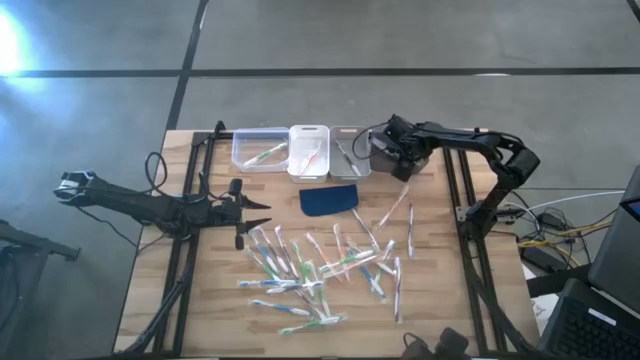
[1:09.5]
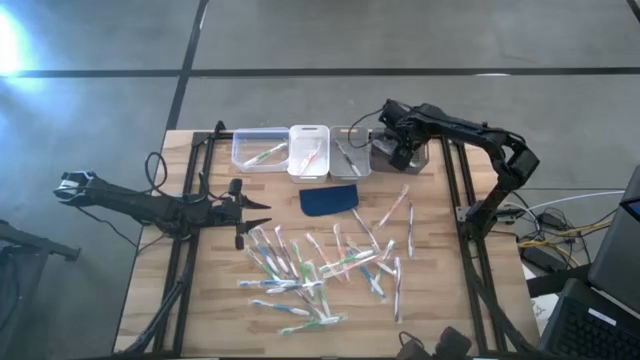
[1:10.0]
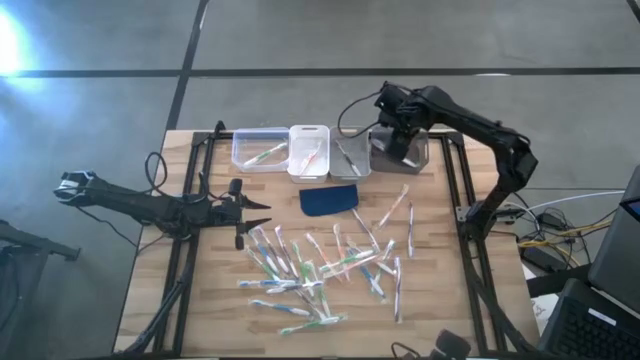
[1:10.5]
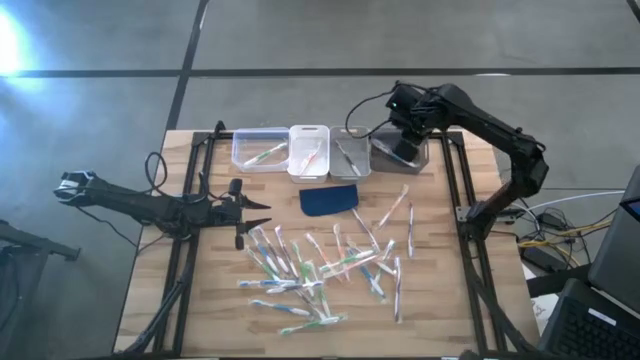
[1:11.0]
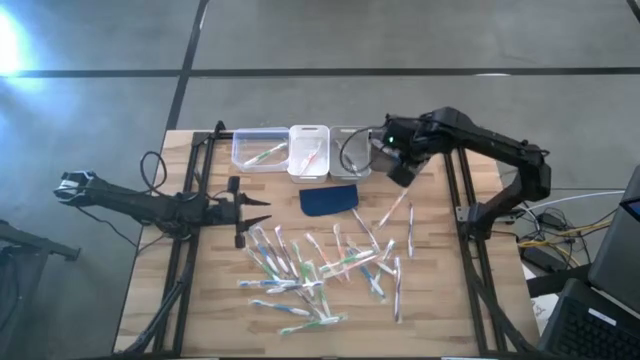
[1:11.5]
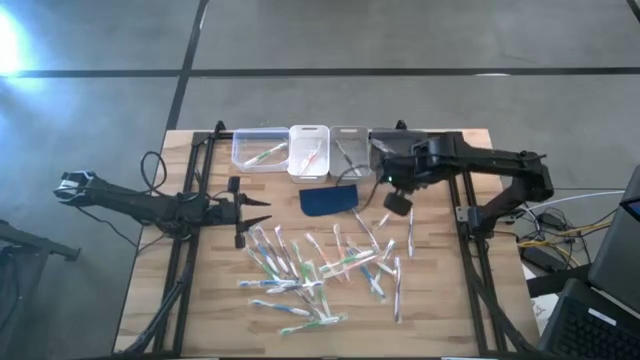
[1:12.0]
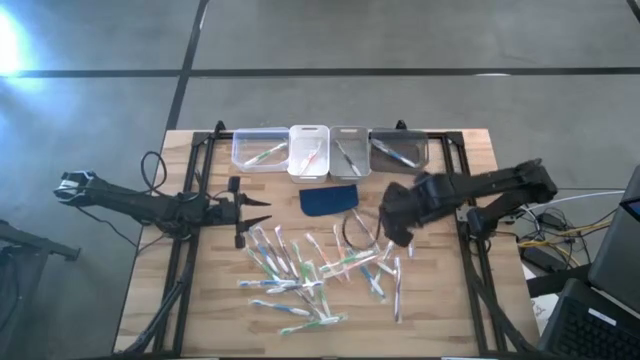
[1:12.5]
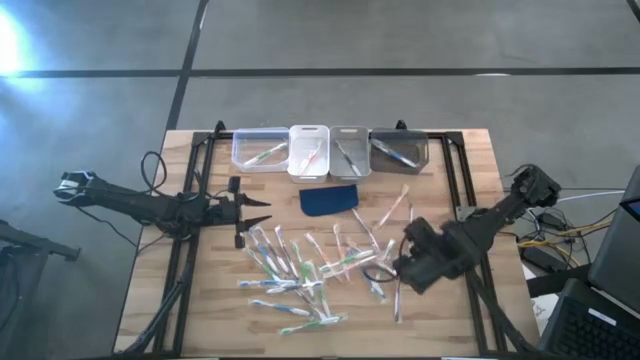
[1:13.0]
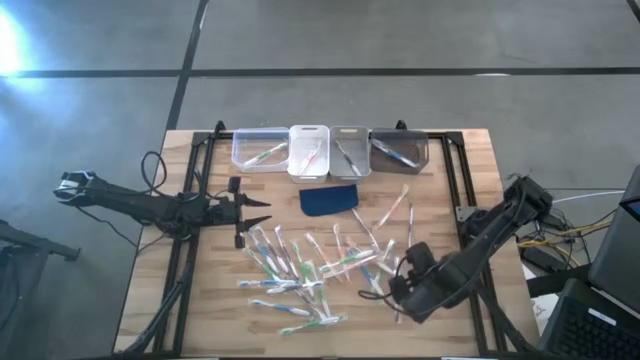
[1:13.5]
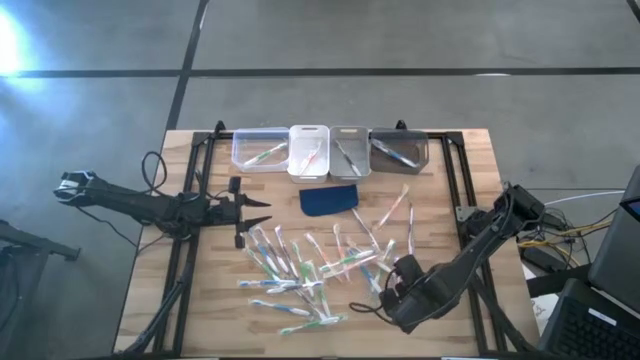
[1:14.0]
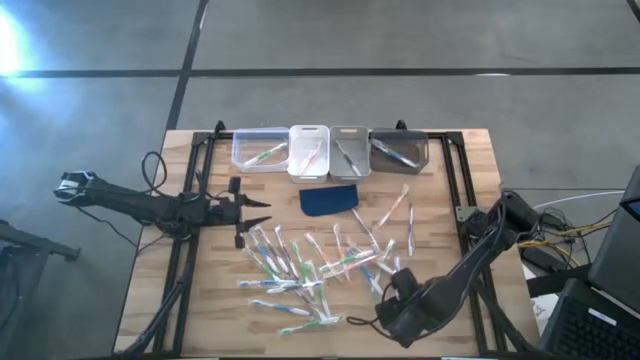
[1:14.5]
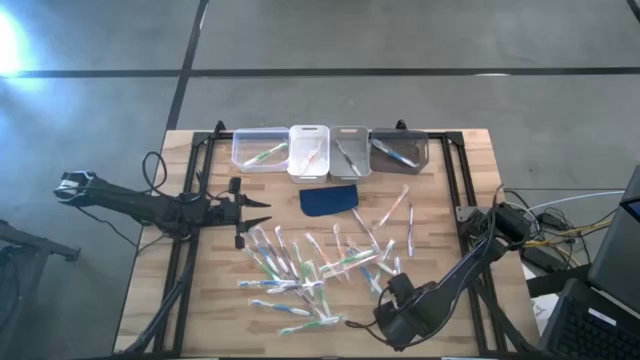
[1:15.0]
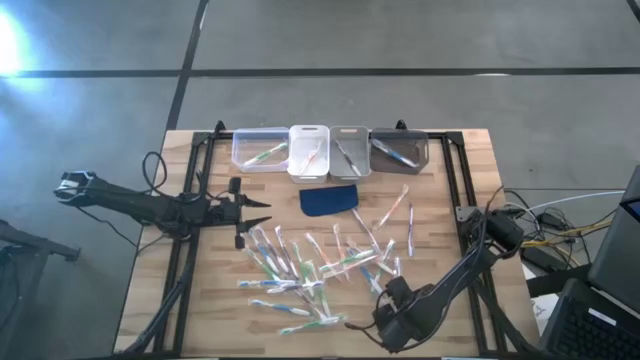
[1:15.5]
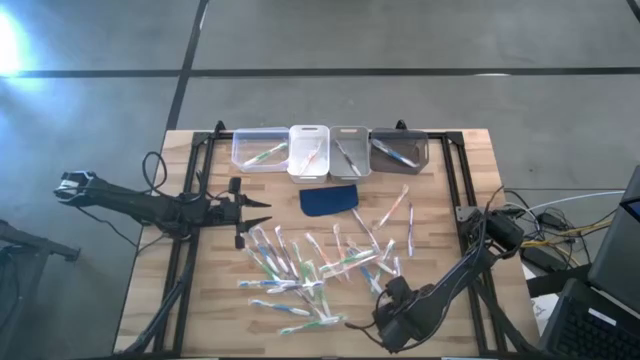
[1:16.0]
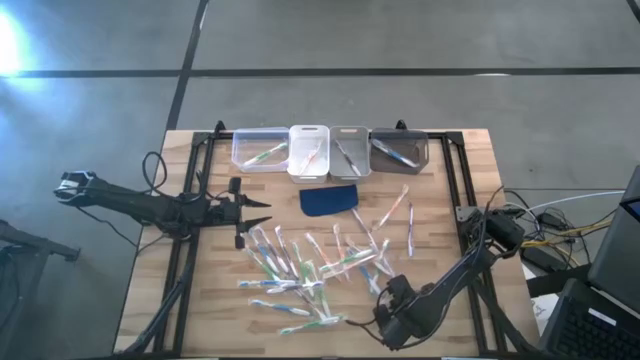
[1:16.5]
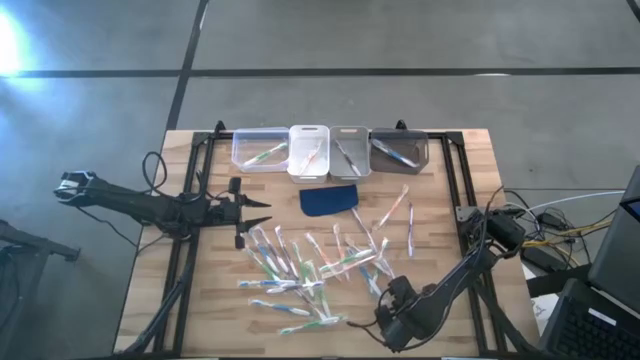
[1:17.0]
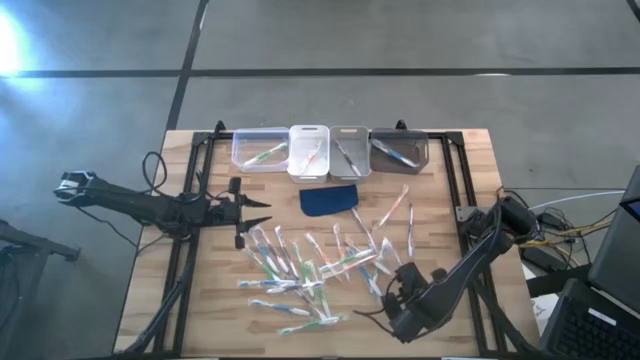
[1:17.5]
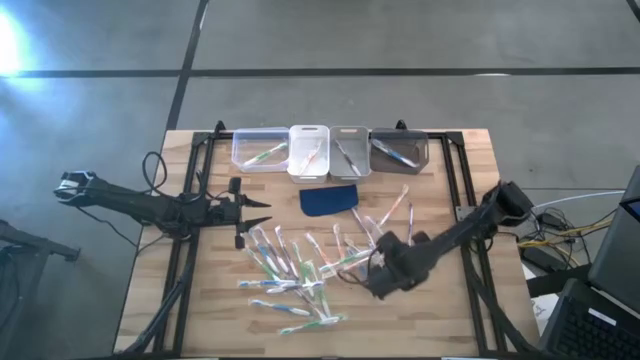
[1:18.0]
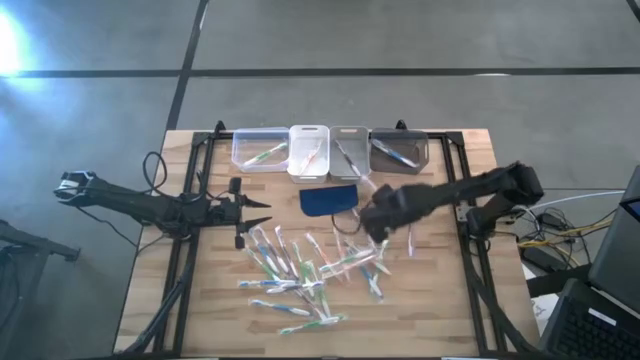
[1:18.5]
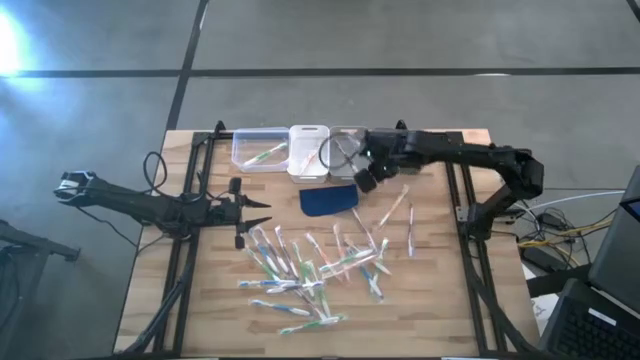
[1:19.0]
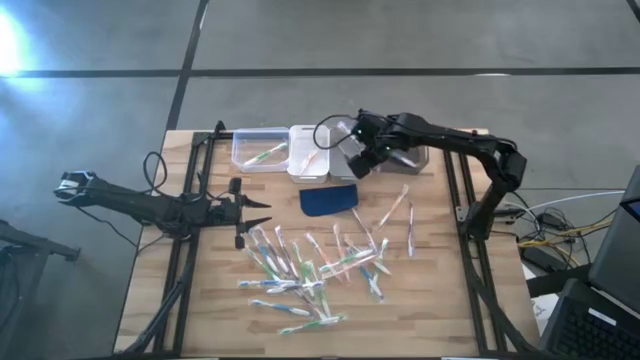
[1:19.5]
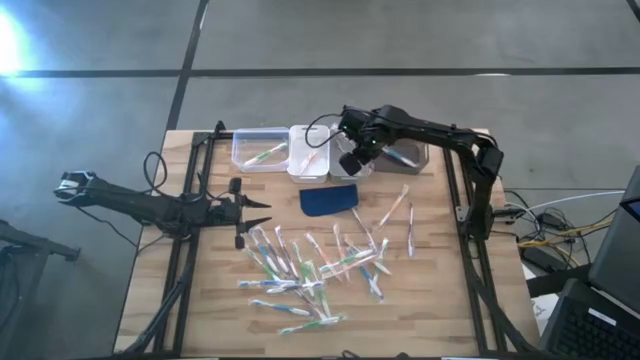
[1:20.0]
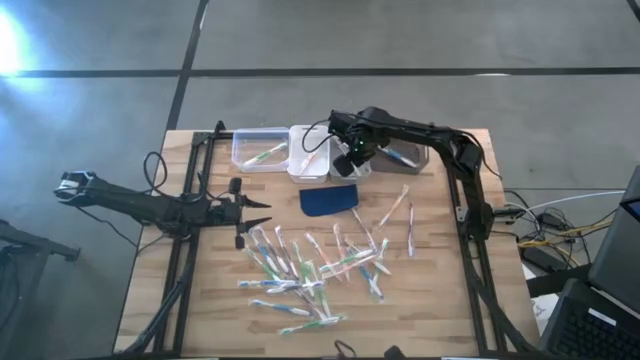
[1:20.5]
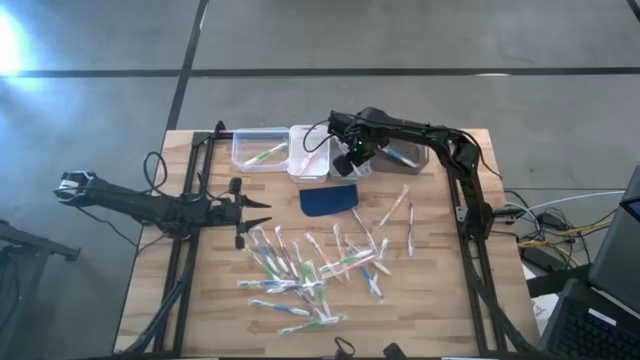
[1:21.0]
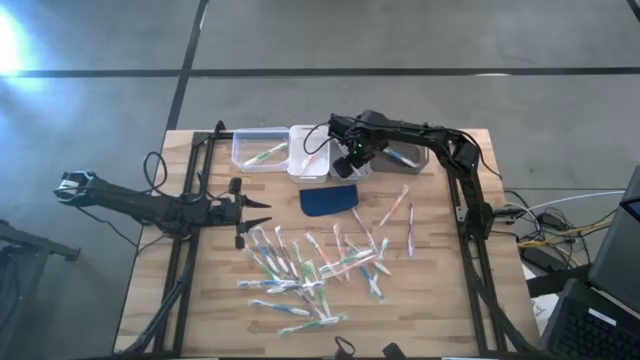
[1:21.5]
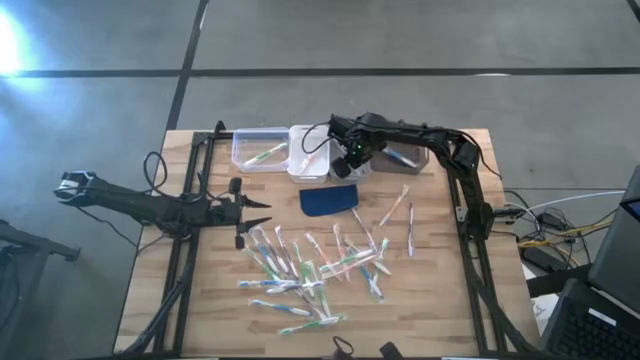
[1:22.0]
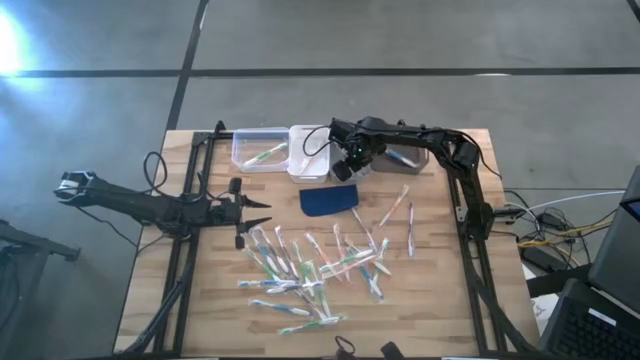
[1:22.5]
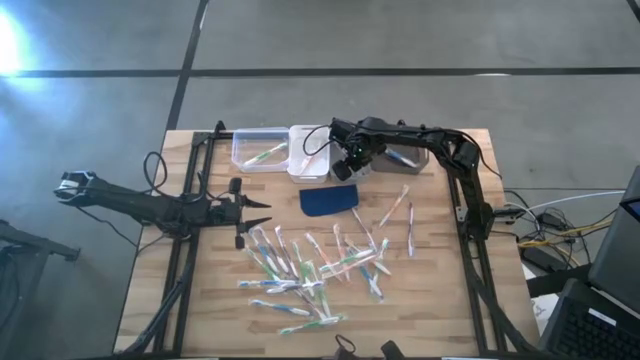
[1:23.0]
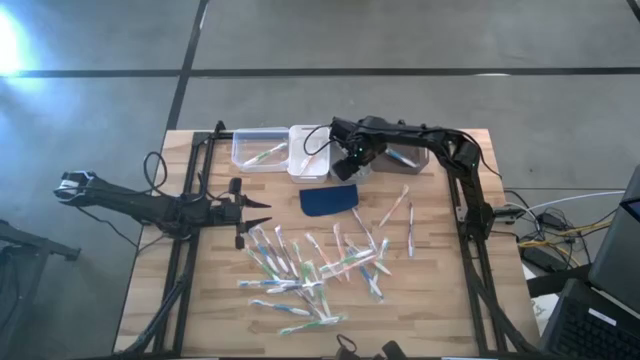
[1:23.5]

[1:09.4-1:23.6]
Task: Pick & Place Toothbrushes
Put the violet toothbrush into the gray bin

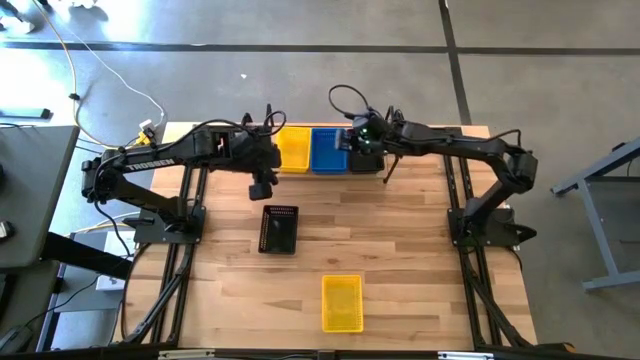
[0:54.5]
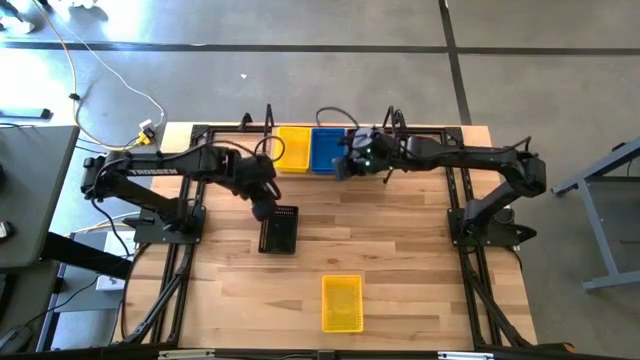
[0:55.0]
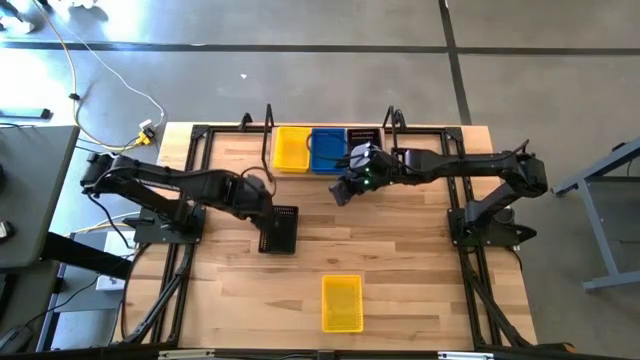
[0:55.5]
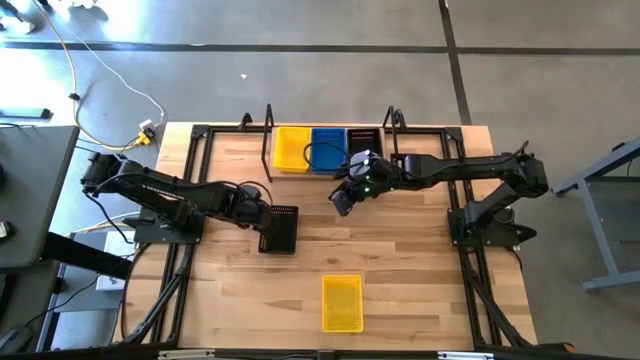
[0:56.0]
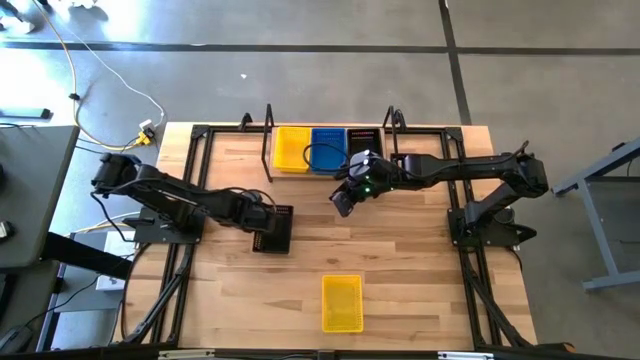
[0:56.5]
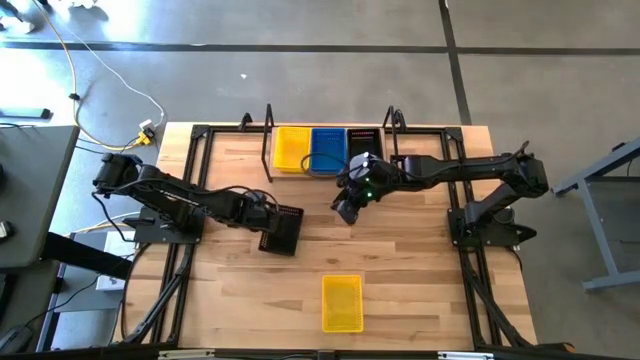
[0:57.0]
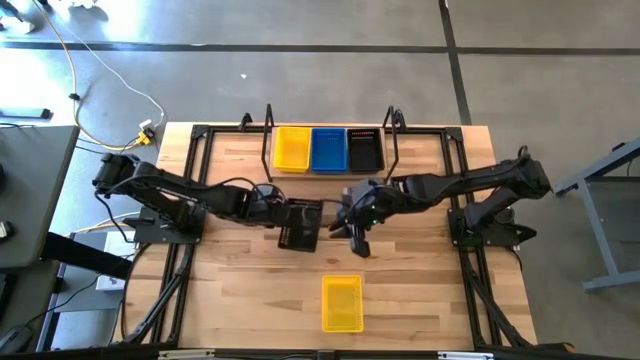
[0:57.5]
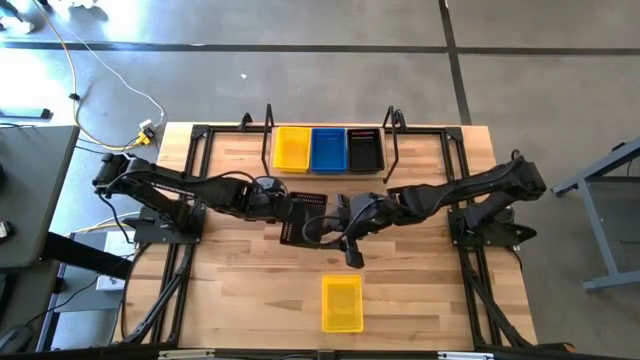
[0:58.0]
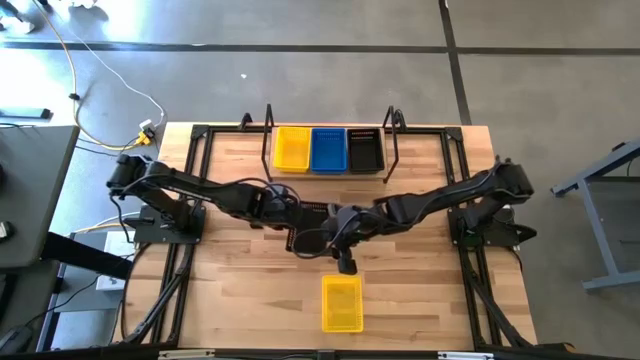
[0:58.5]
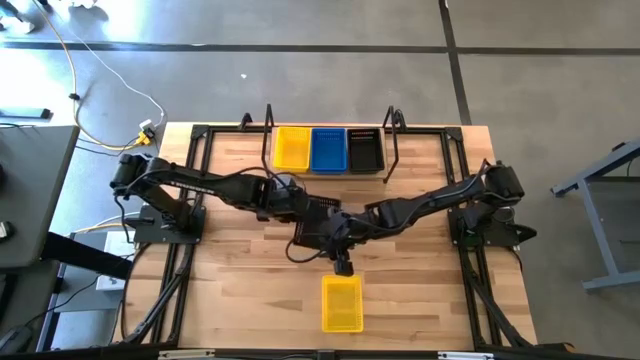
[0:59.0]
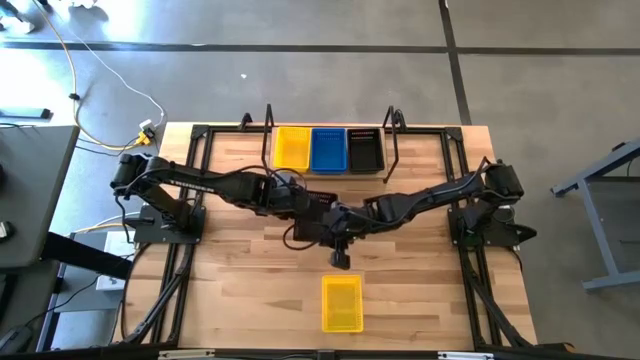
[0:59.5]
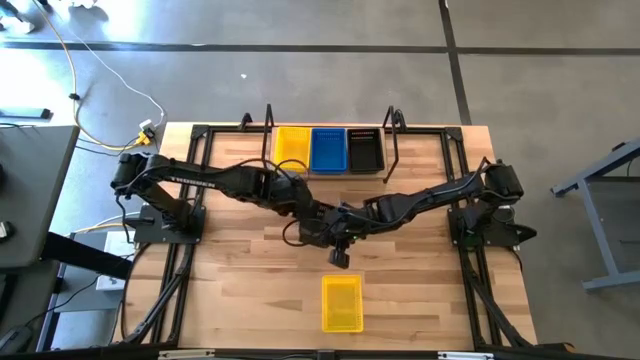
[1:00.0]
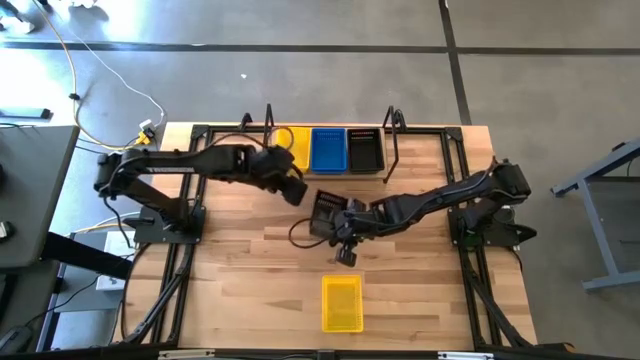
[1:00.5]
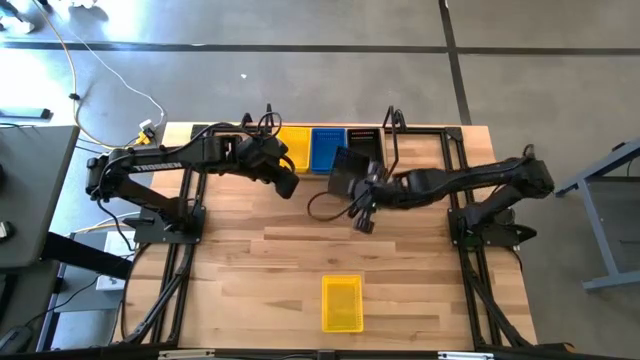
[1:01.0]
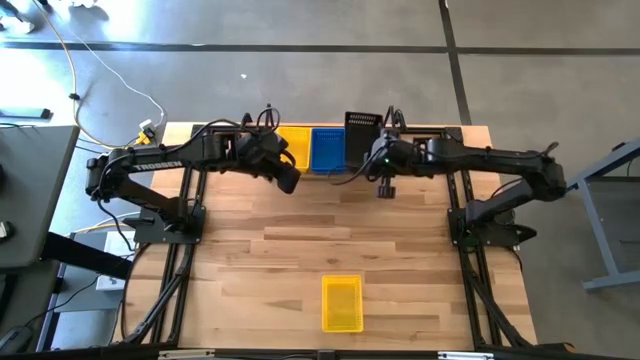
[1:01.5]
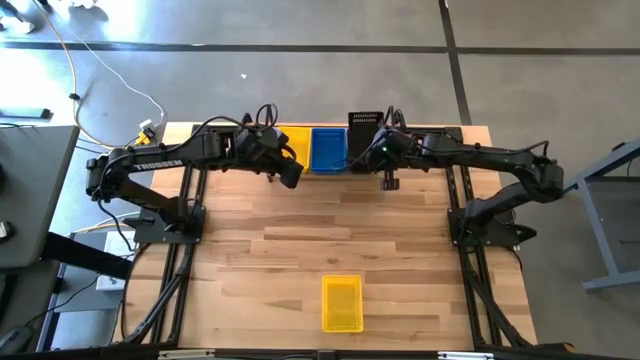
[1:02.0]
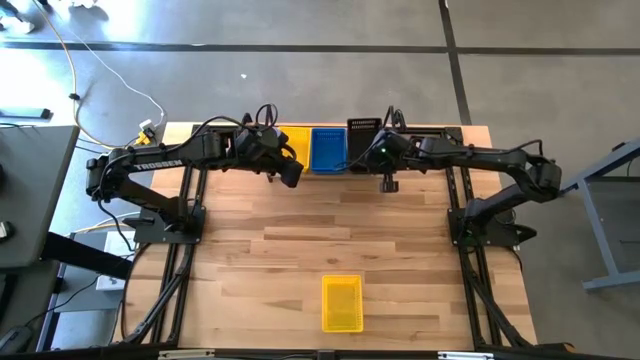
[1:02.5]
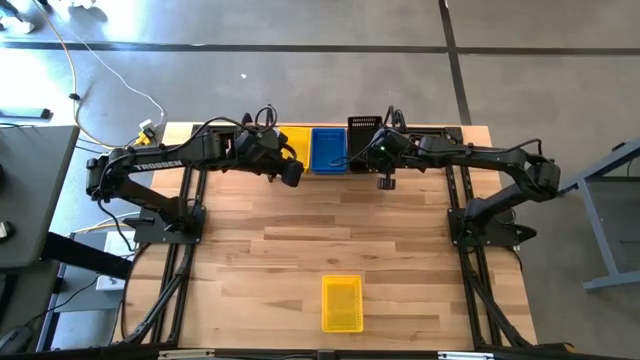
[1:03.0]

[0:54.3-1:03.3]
Task: Stack baskets on shelf by color
Stack the black basket on the black baskets on the shelf
